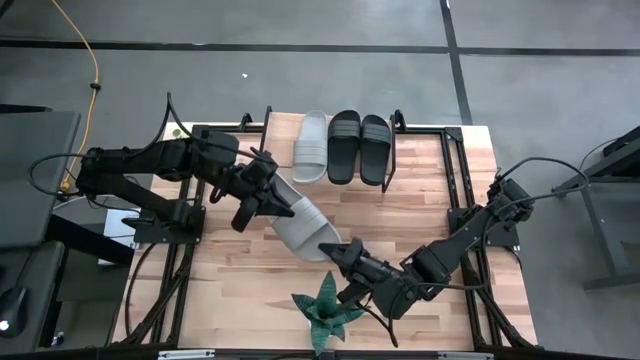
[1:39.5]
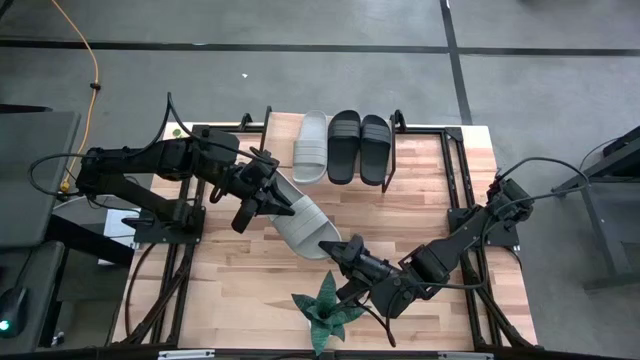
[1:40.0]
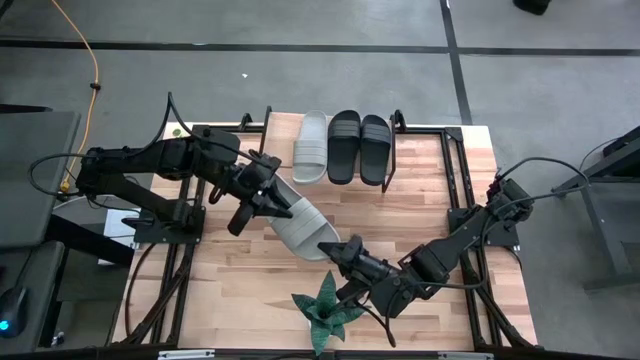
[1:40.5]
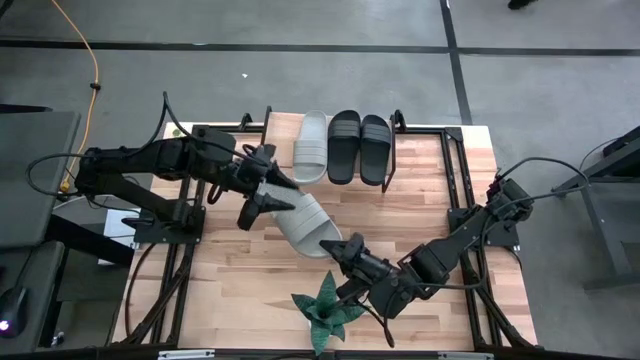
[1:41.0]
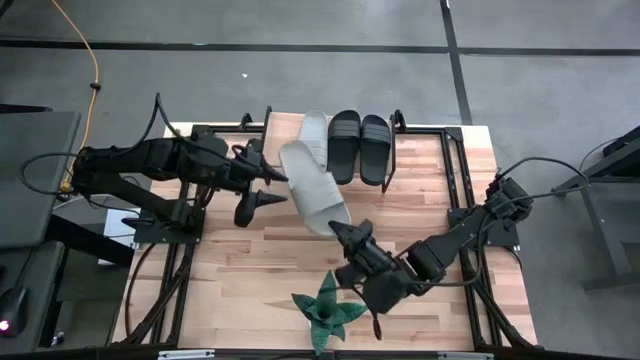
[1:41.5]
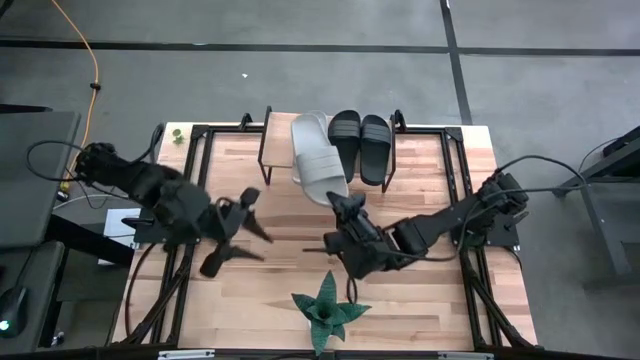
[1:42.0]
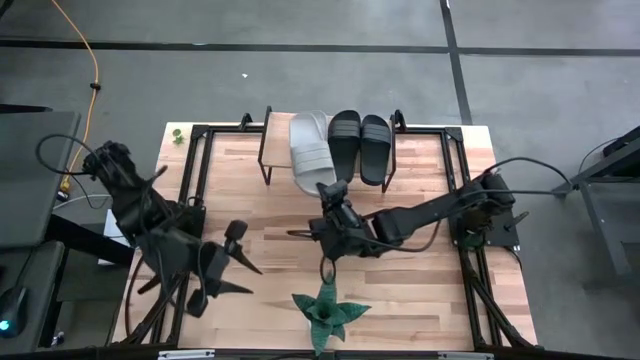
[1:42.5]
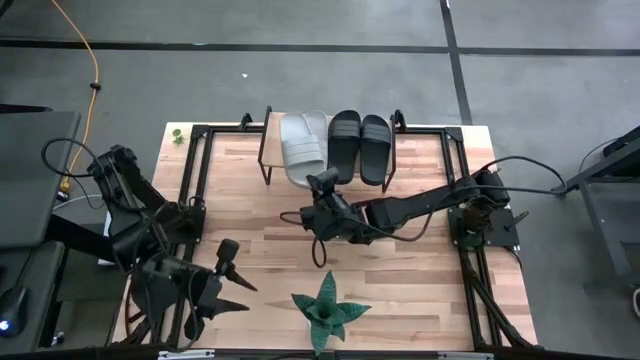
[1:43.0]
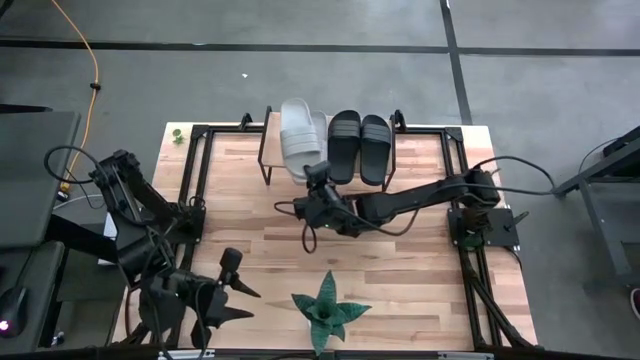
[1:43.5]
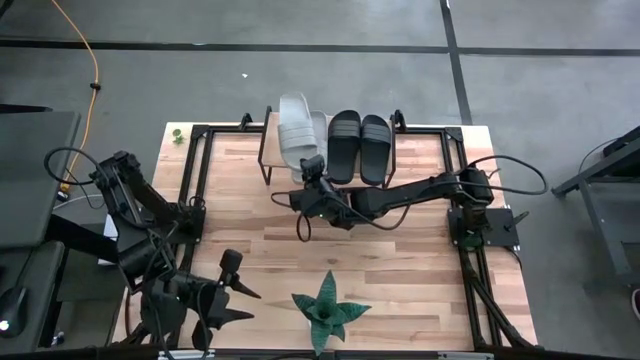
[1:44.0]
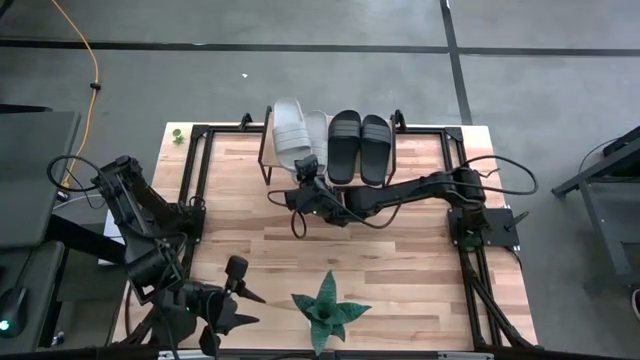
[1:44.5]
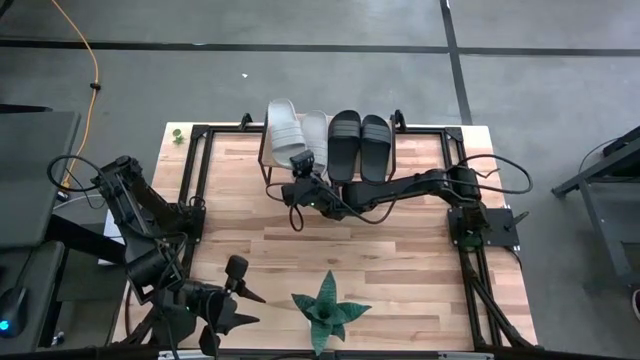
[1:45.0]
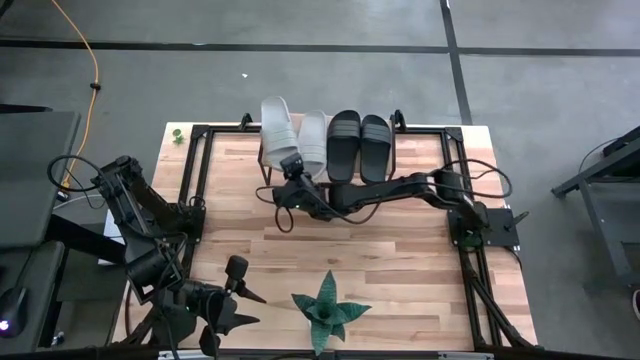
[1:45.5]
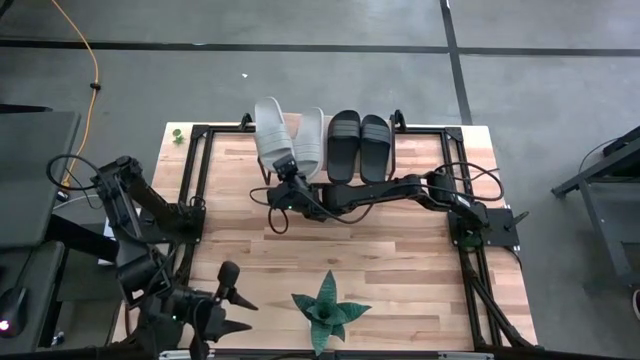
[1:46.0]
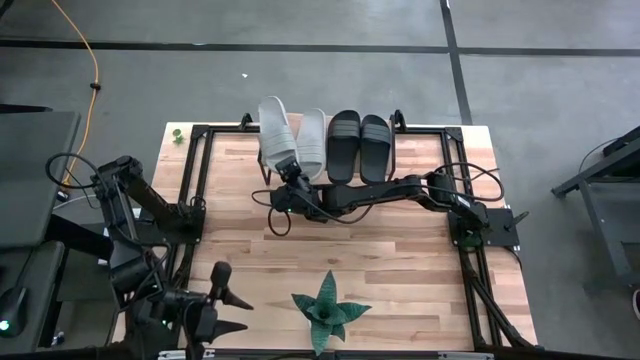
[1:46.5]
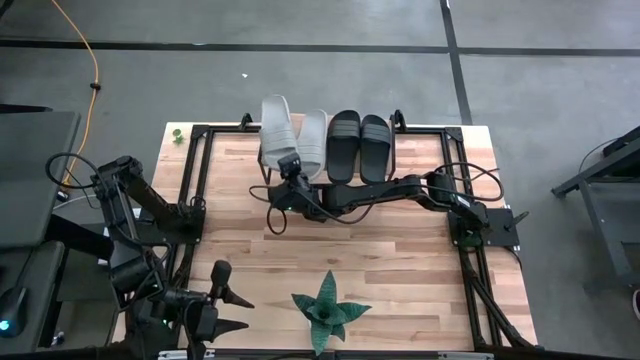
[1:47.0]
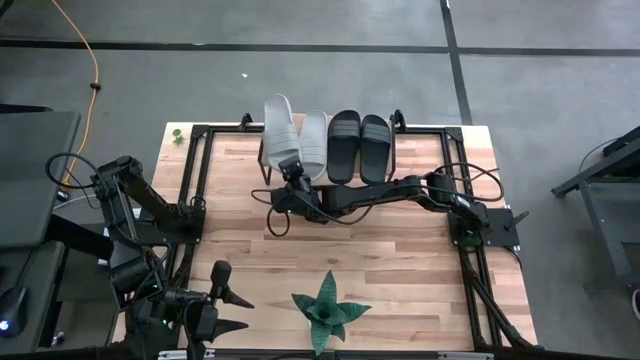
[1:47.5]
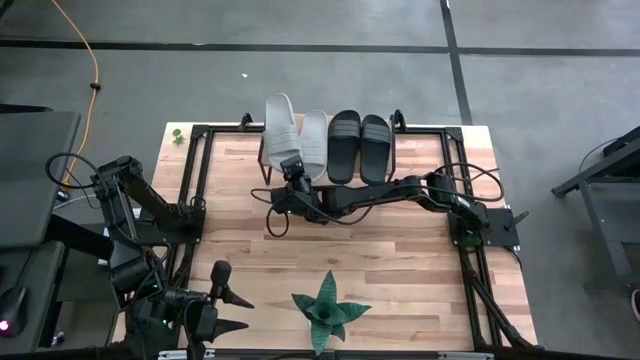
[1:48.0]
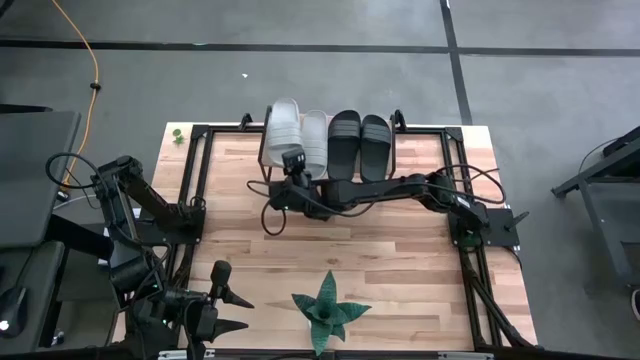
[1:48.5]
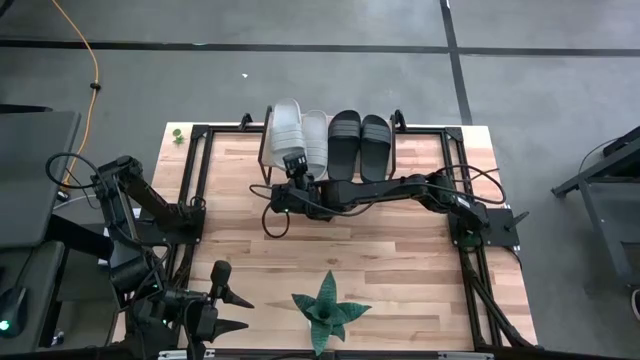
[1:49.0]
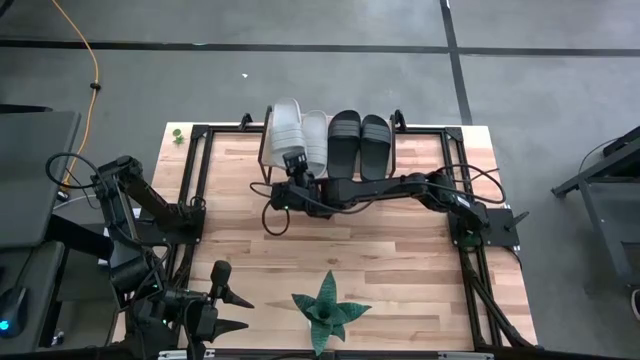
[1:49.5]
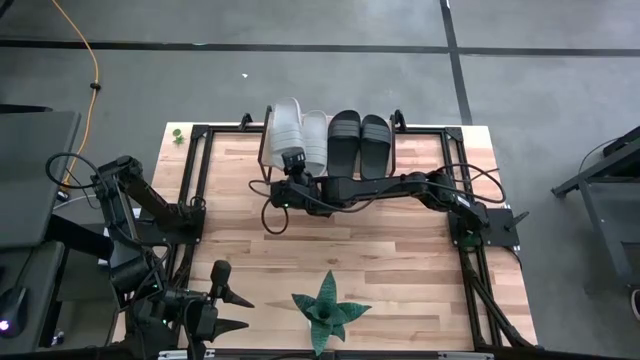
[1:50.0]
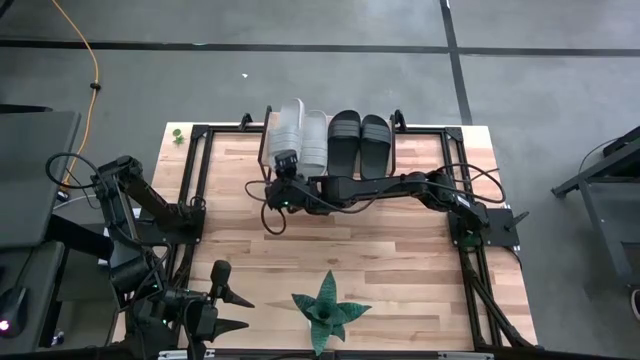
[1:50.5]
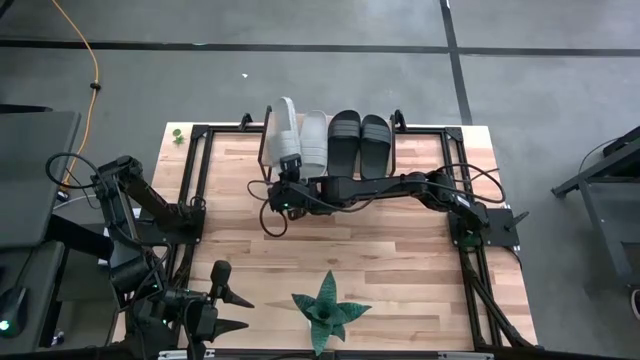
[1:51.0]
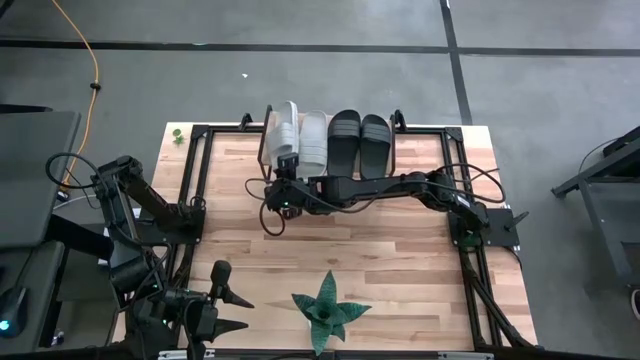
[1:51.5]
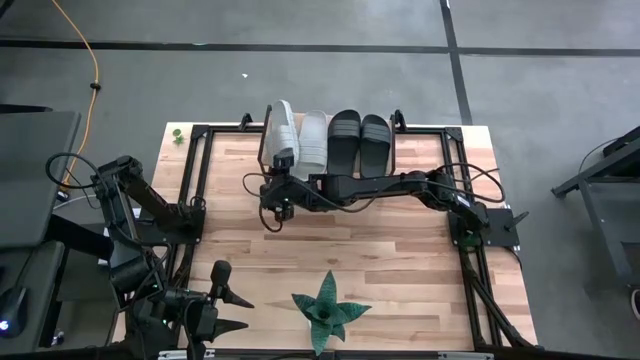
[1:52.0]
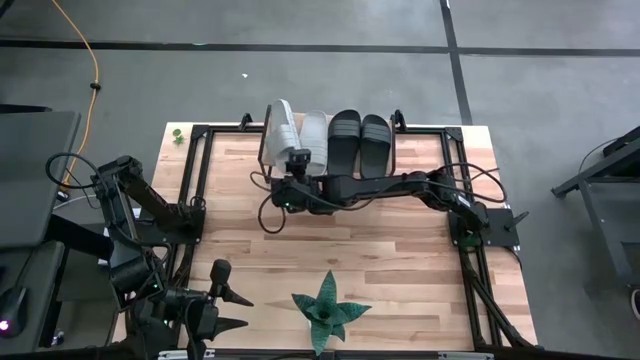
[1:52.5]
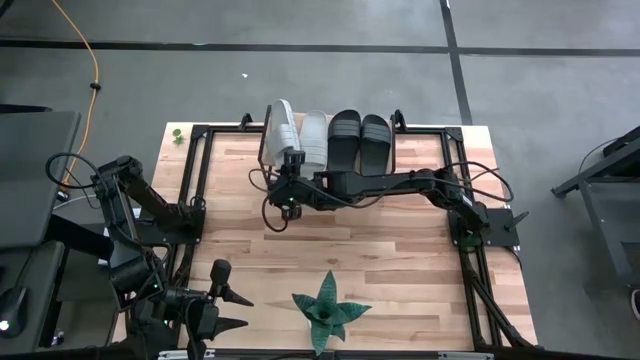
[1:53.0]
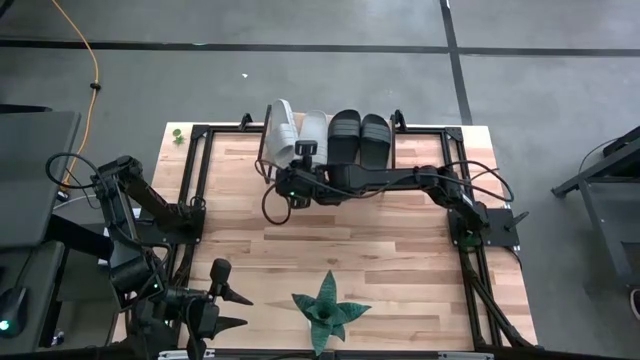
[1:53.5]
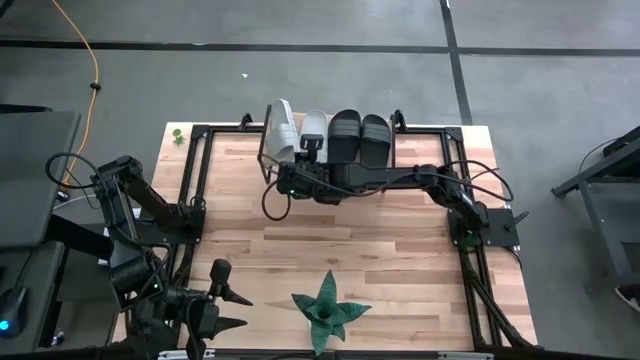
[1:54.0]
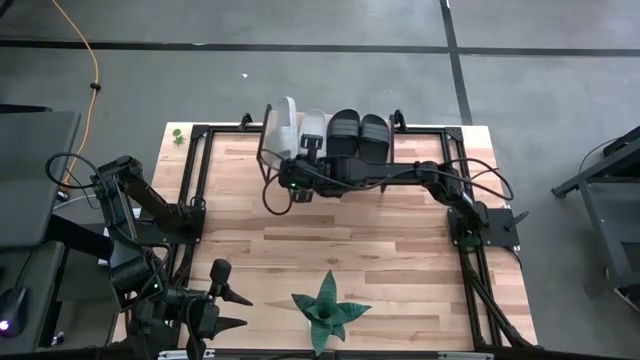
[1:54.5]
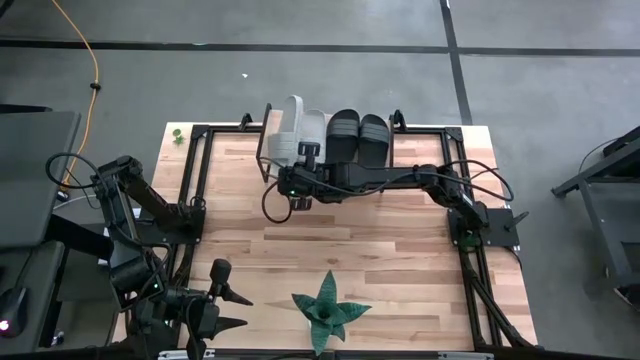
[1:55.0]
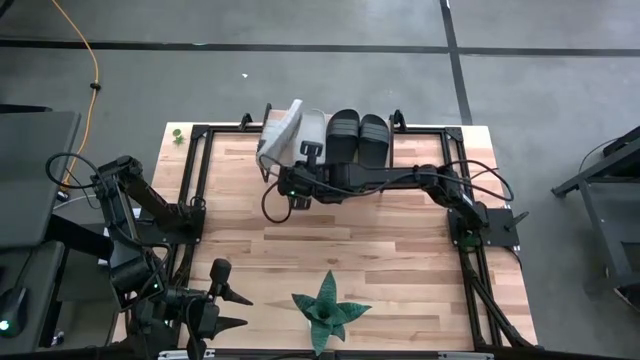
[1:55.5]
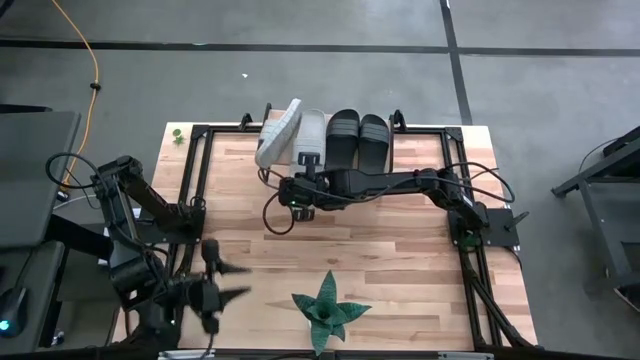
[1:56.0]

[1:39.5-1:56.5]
Task: Pick and place slides into the shelf
Put the gray slipper on the shelf

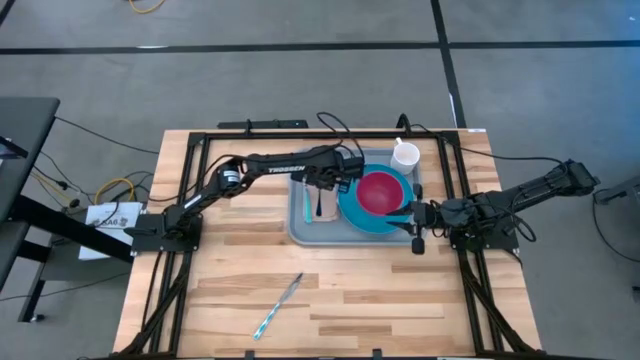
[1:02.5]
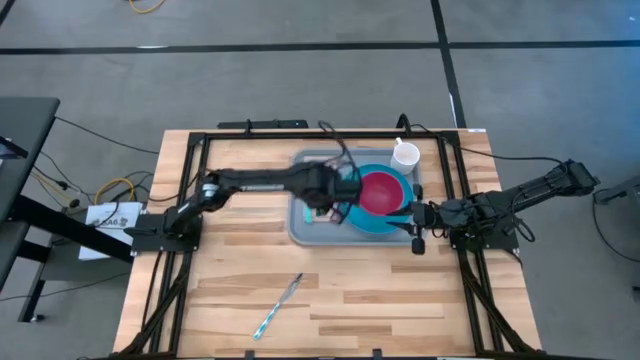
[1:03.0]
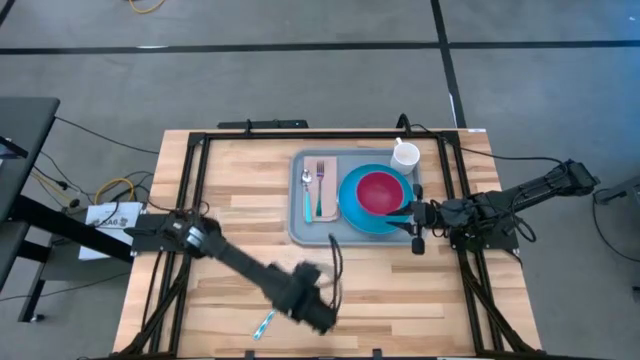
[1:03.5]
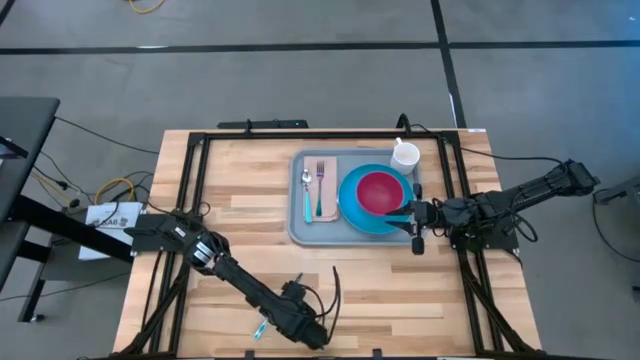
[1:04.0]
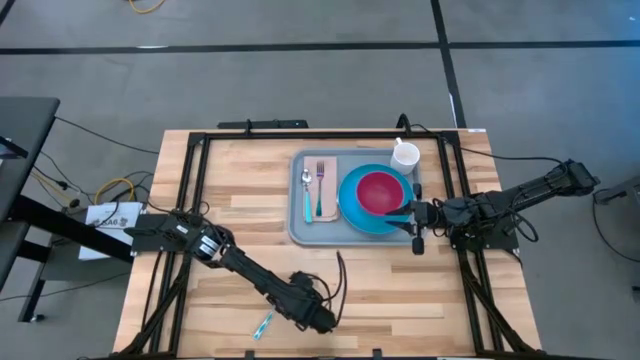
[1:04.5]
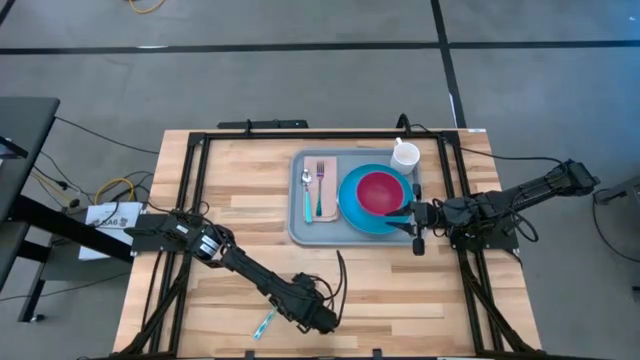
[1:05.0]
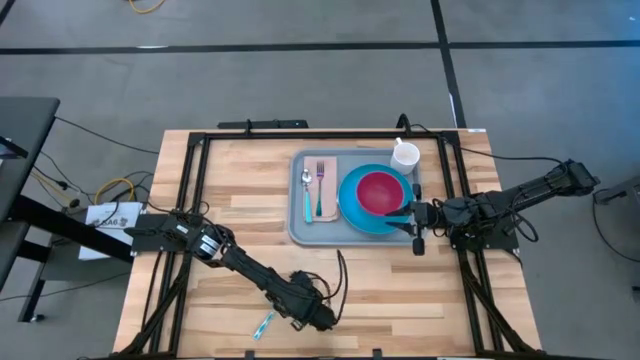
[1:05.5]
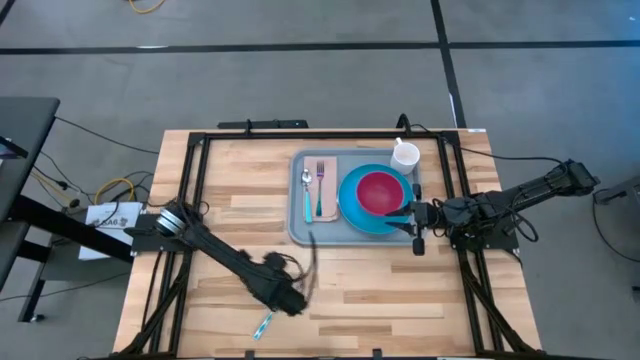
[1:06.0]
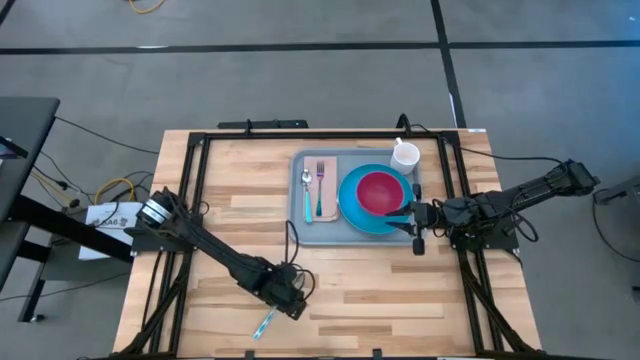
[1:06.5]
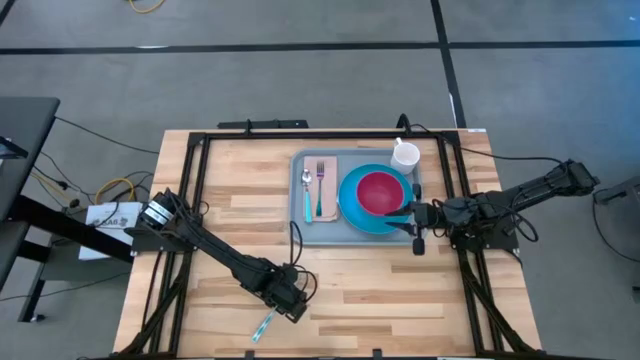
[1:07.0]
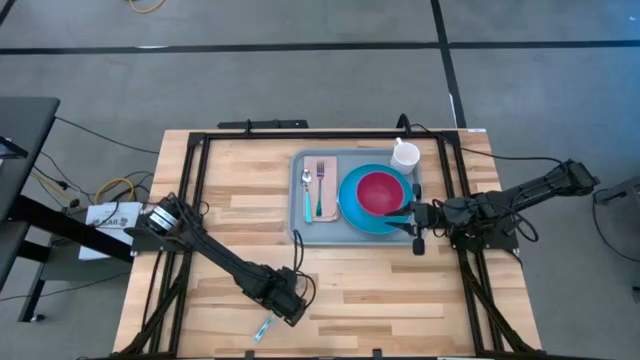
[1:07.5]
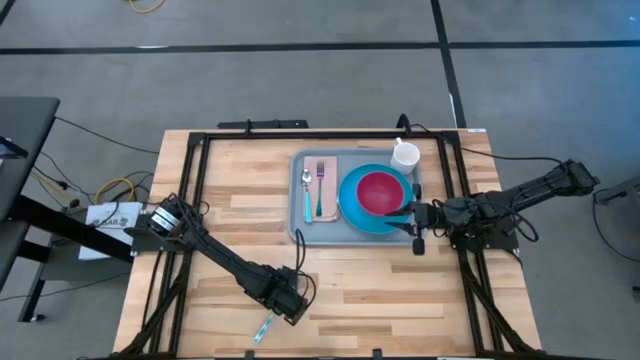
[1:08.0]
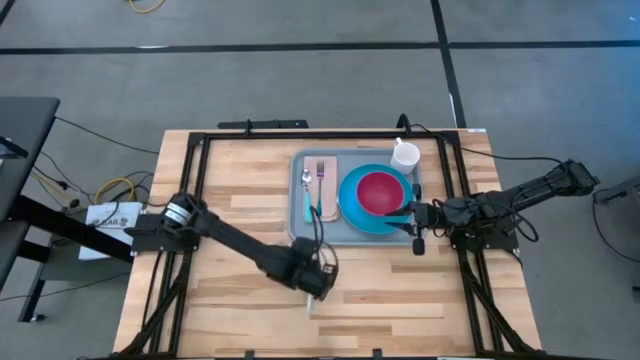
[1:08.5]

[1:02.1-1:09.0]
Task: Set up tray
Put the green table knife between the blue fork and the green spoon on the light brown napkin on the gray serving tray
